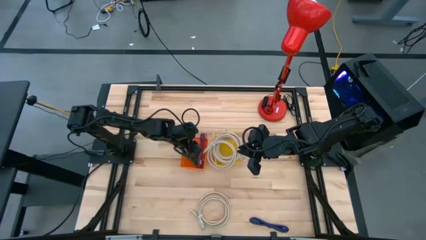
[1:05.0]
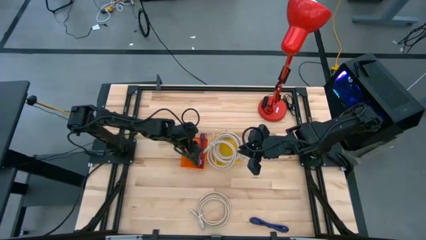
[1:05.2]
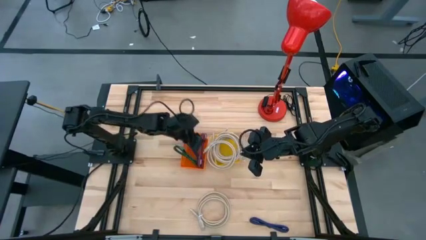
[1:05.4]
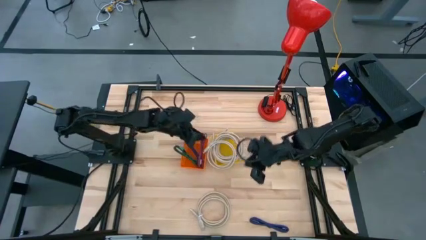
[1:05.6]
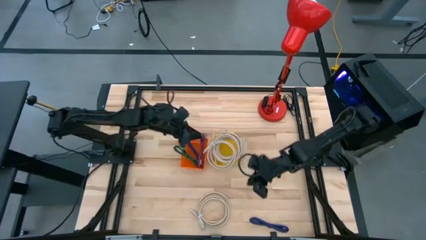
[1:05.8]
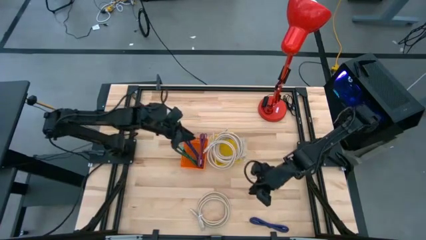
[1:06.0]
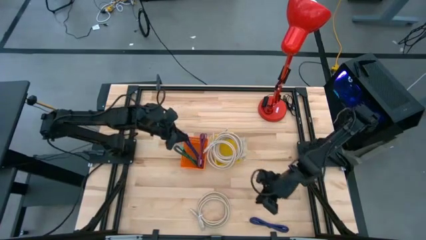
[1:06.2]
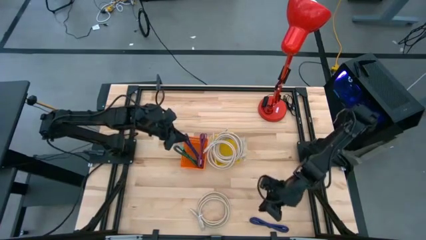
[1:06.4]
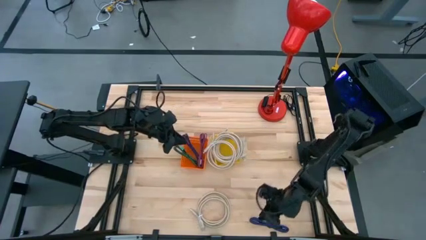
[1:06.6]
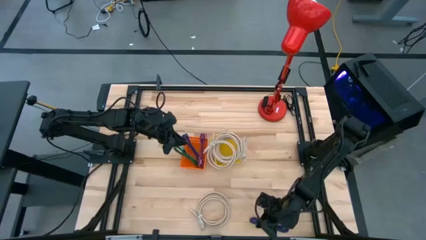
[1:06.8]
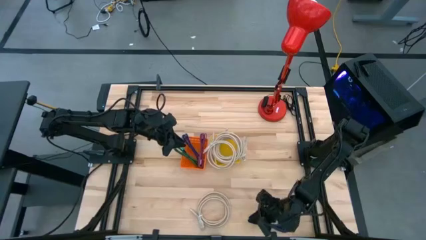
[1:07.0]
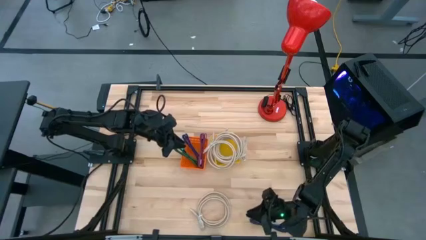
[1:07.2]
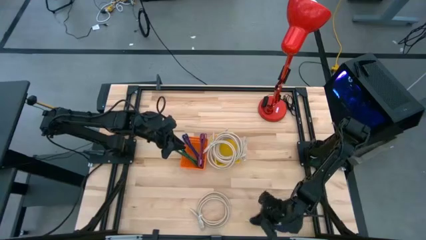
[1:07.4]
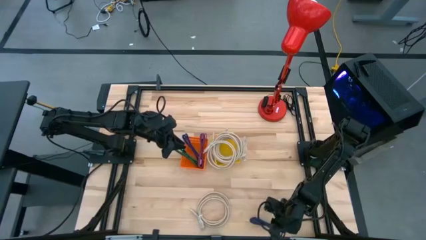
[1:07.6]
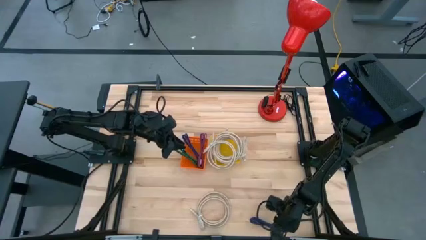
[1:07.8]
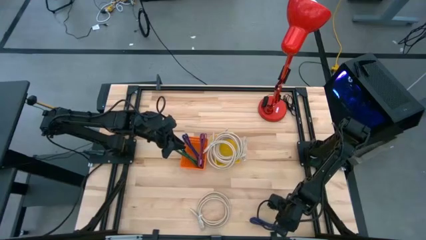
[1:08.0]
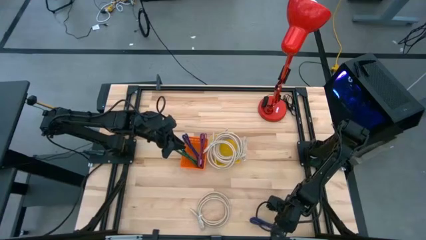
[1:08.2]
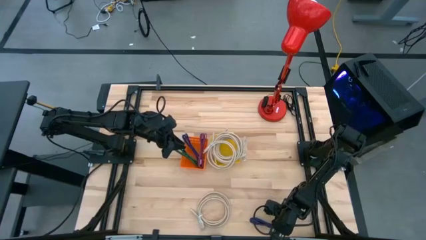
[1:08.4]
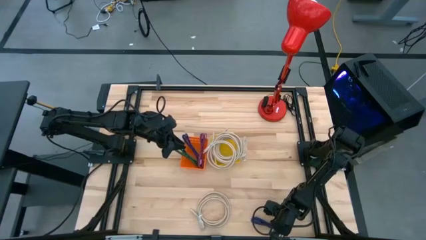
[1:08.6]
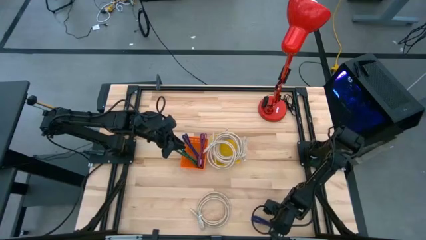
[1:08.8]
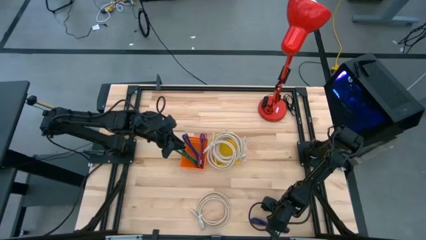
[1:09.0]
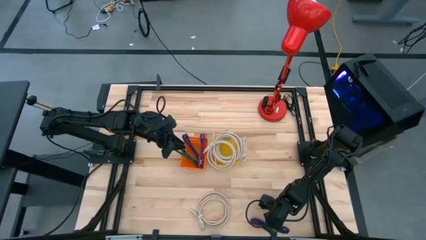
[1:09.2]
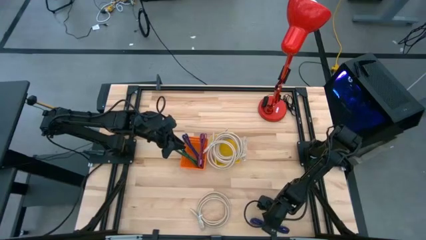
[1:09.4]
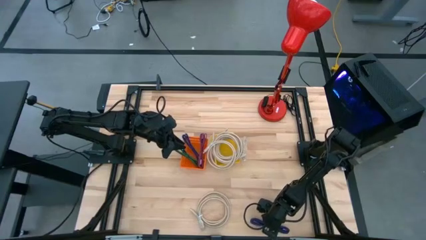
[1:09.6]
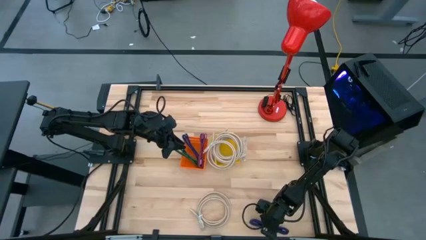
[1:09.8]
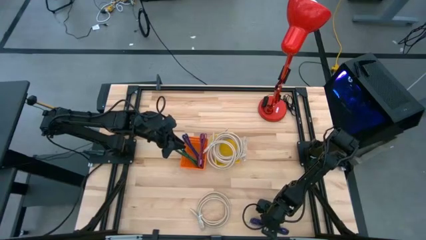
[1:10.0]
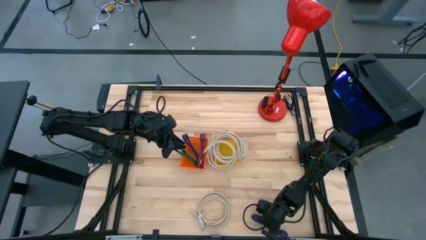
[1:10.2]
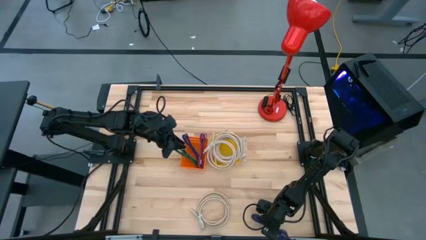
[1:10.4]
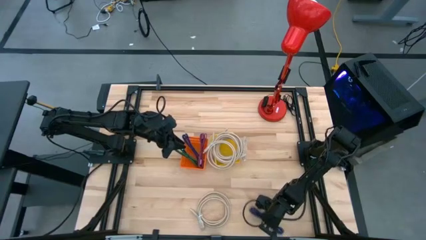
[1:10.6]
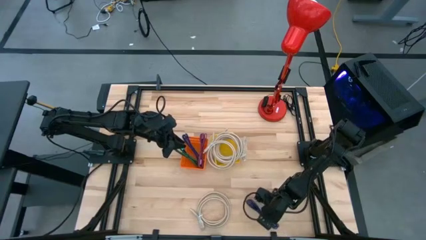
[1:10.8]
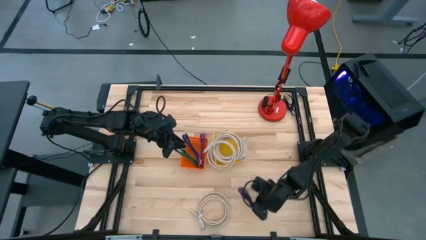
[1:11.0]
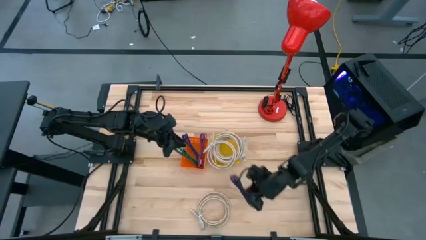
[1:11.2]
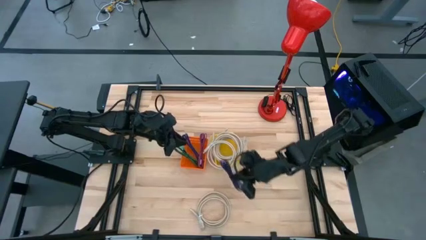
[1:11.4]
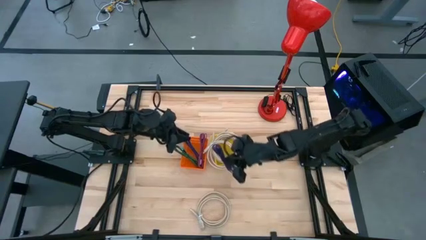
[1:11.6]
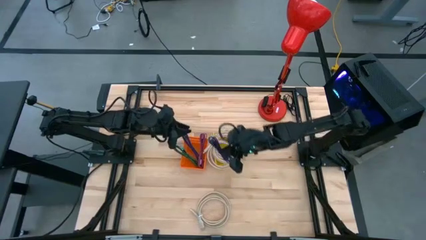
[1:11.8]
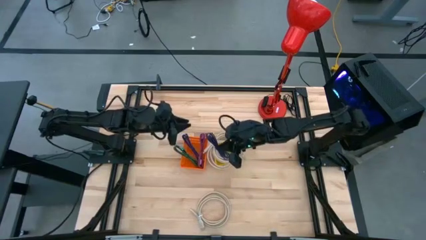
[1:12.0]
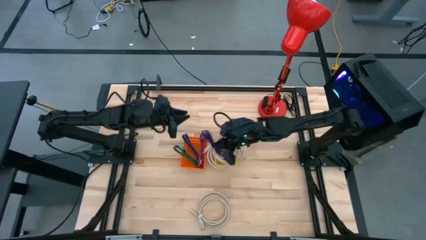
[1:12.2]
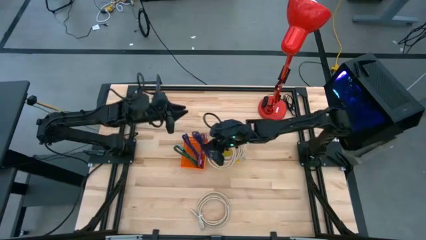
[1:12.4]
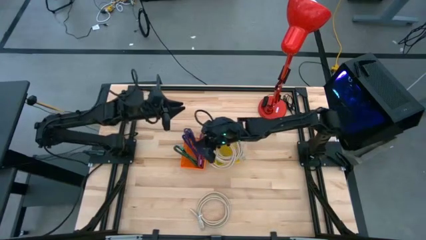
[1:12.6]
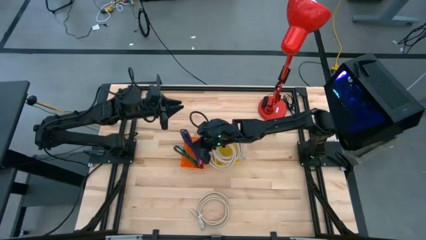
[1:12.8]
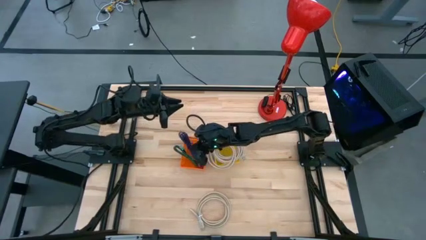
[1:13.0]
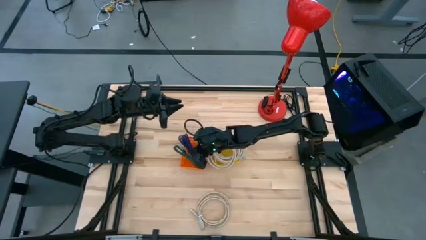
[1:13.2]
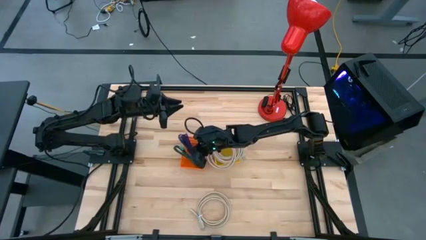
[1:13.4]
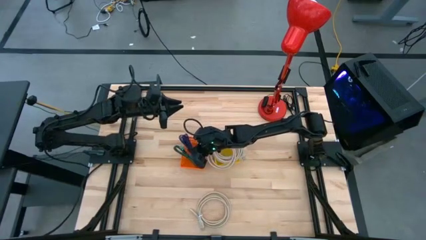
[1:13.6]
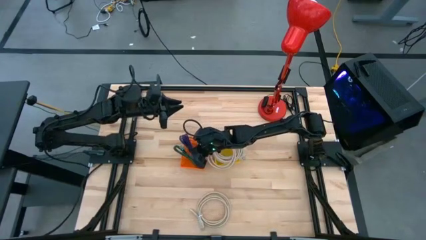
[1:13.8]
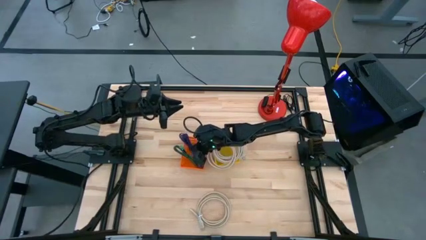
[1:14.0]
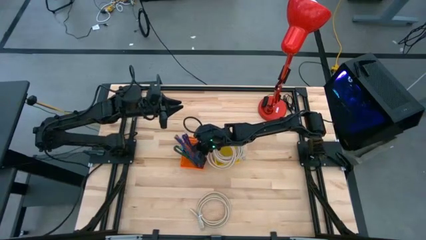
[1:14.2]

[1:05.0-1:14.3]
Task: Pick & Place USB Port
Put the black and blue USB cable into the orange bin

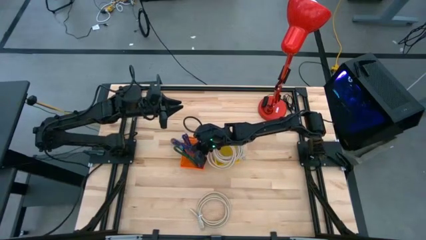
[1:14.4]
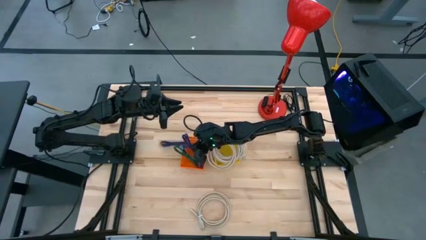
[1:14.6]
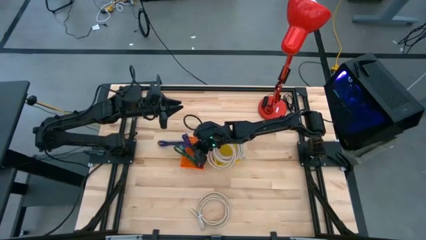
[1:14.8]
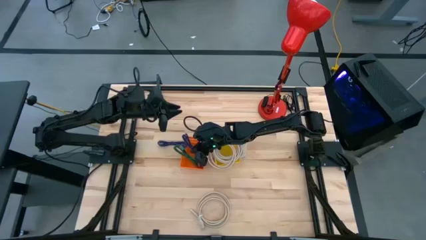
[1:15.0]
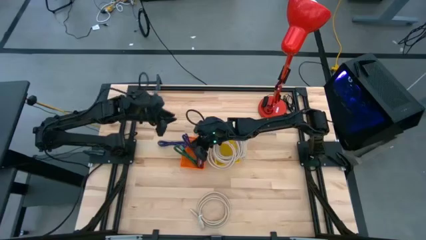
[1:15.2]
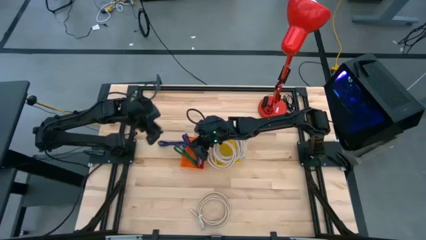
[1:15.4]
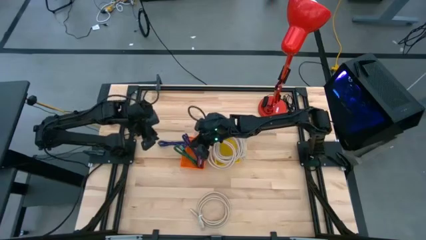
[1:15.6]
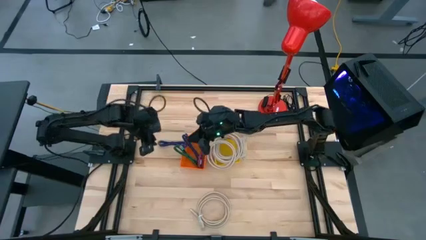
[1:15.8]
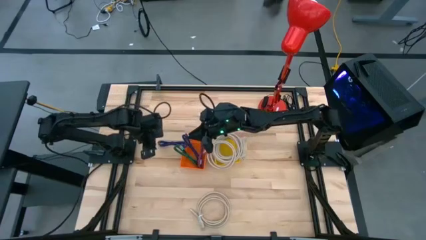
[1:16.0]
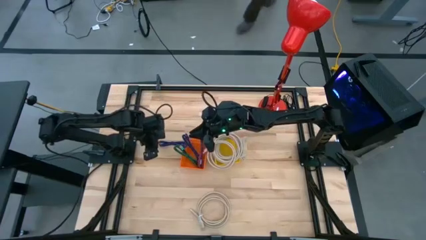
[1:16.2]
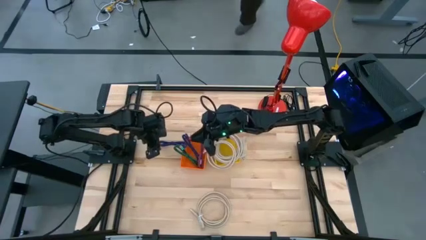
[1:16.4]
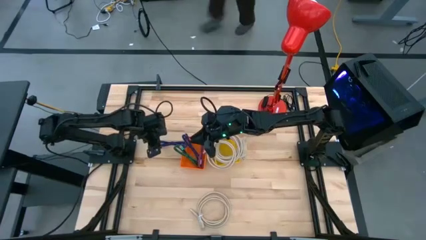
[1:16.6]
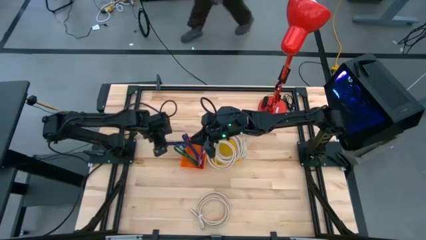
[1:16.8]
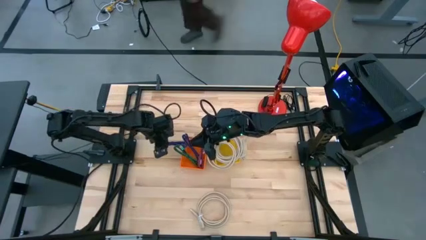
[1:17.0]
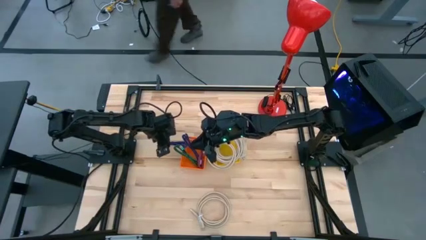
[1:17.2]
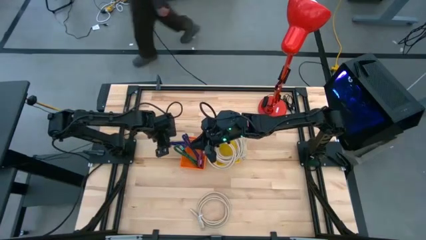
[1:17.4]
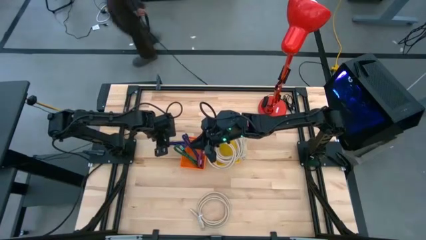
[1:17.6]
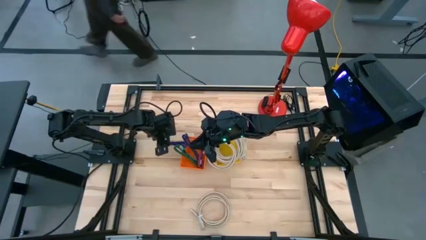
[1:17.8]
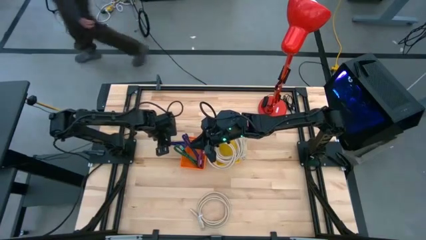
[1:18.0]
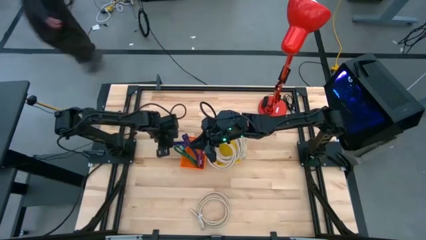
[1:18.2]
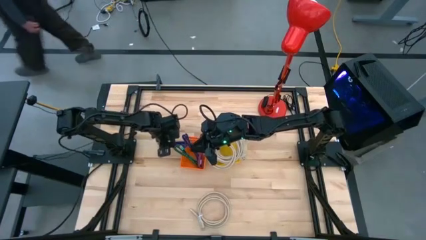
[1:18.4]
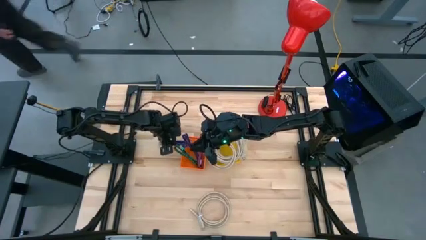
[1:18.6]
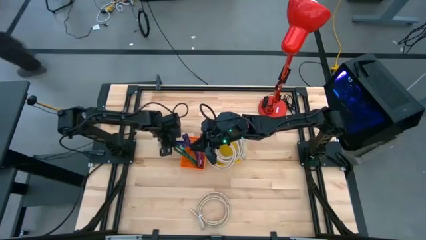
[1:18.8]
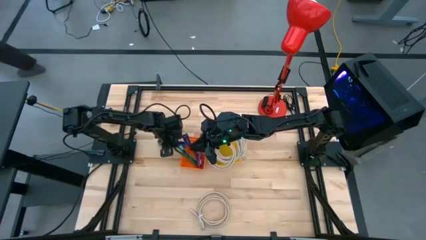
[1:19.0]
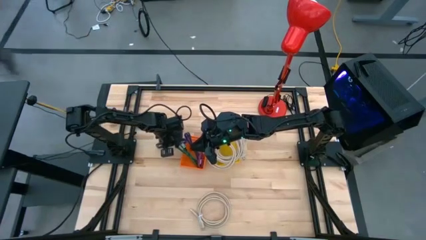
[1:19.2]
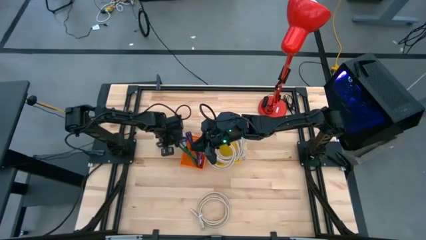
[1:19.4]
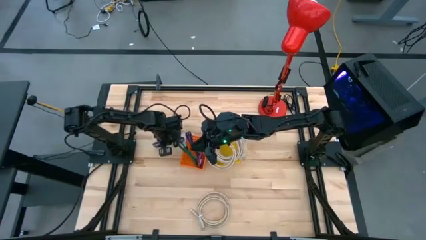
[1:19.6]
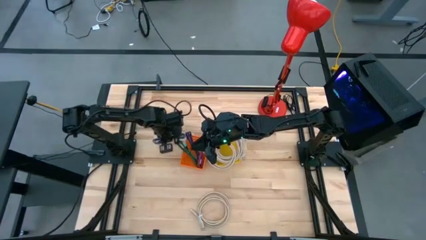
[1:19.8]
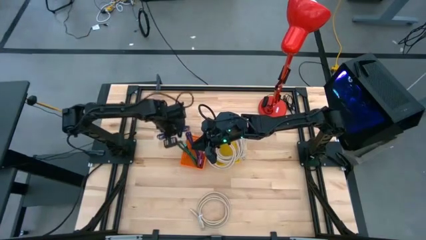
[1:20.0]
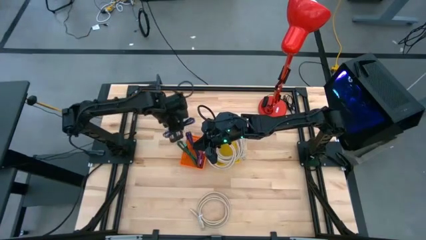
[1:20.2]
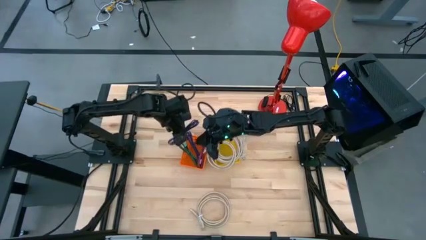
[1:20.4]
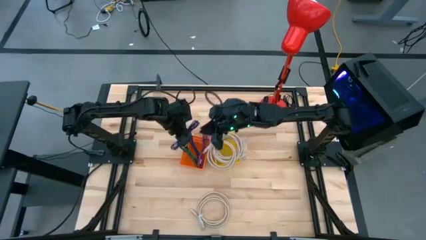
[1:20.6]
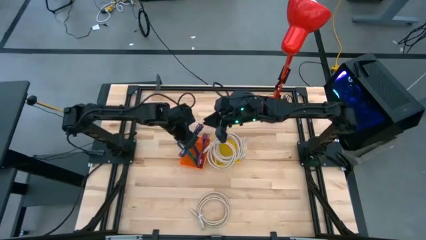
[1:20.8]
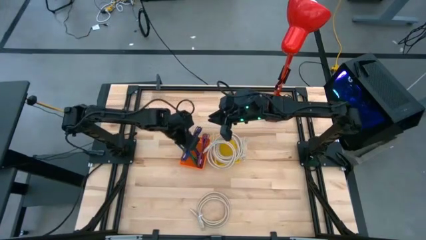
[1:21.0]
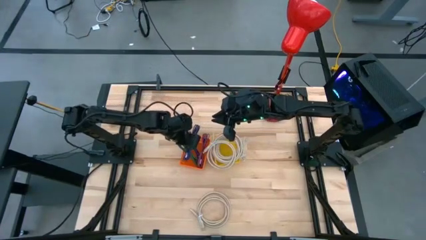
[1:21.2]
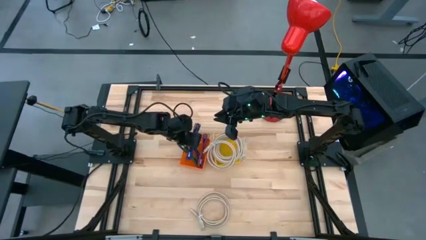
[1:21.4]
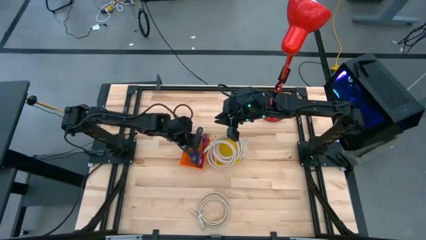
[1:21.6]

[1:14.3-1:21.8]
Put the black and blue USB cable into the orange bin
